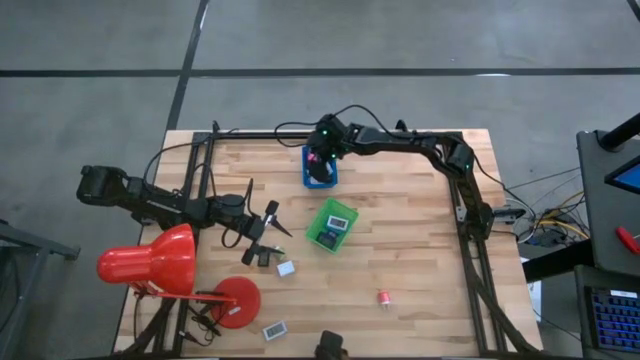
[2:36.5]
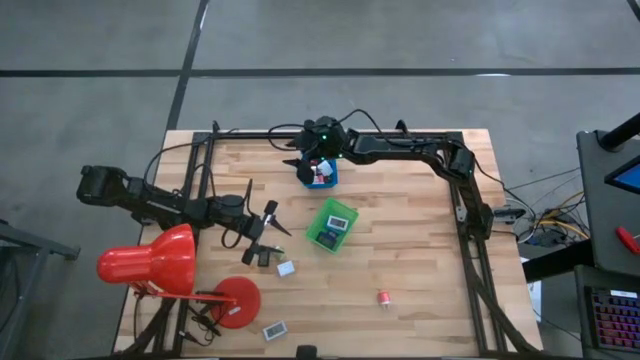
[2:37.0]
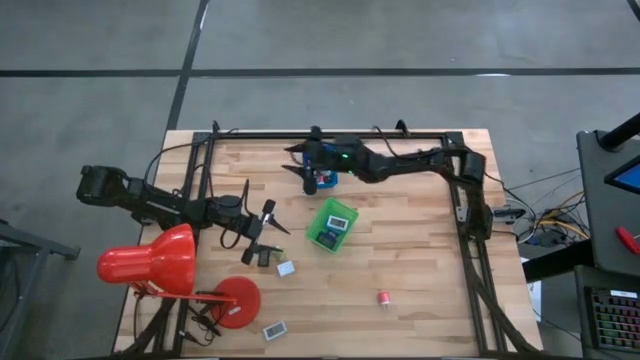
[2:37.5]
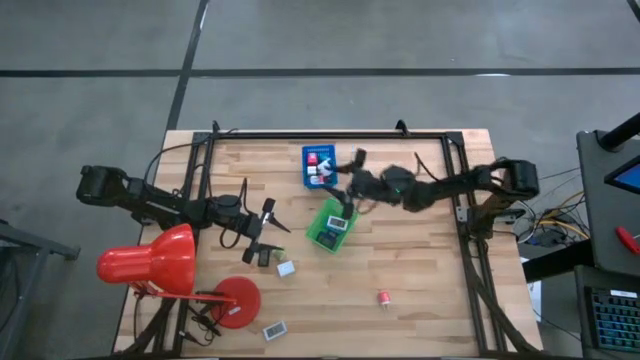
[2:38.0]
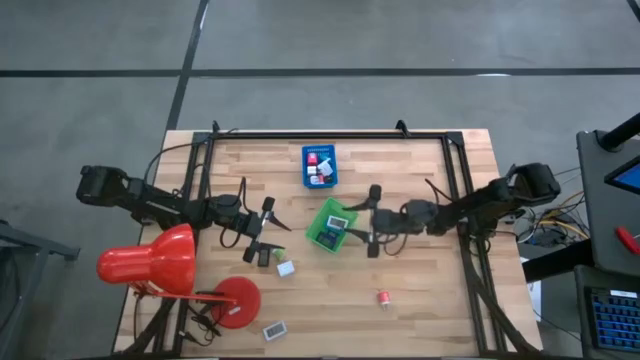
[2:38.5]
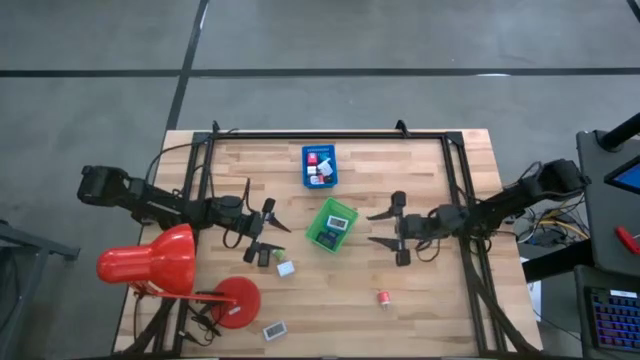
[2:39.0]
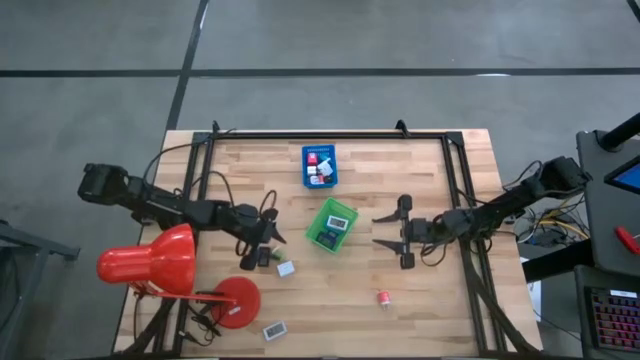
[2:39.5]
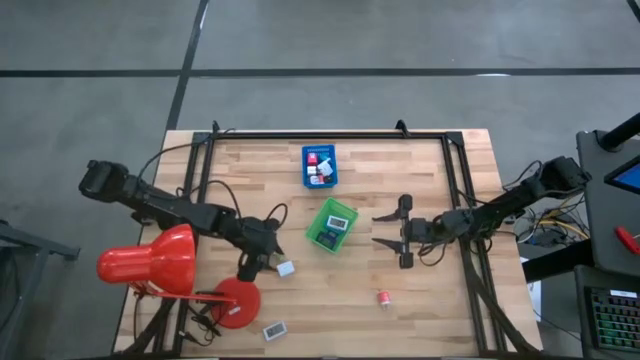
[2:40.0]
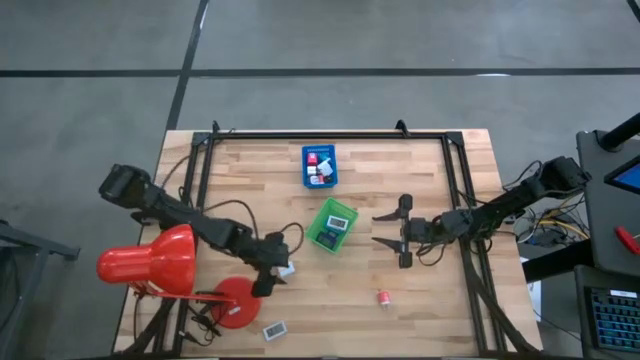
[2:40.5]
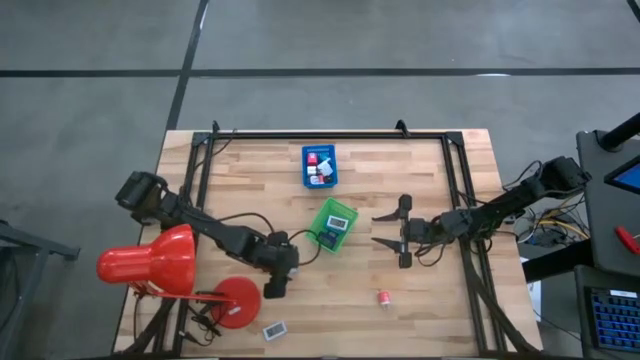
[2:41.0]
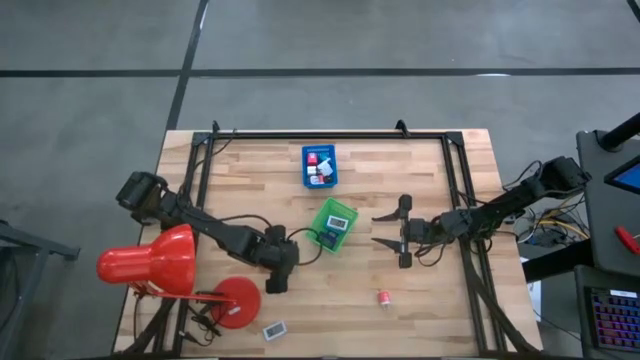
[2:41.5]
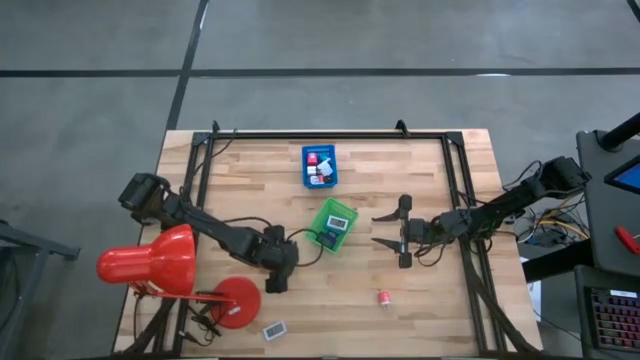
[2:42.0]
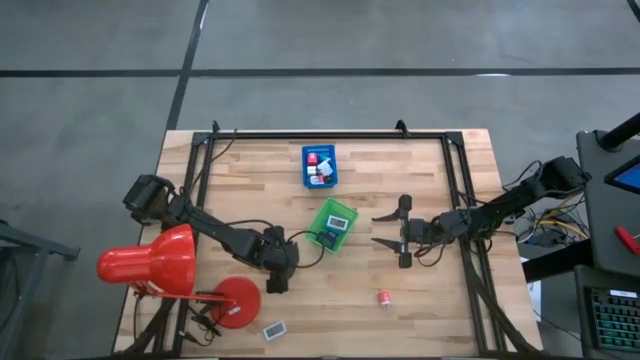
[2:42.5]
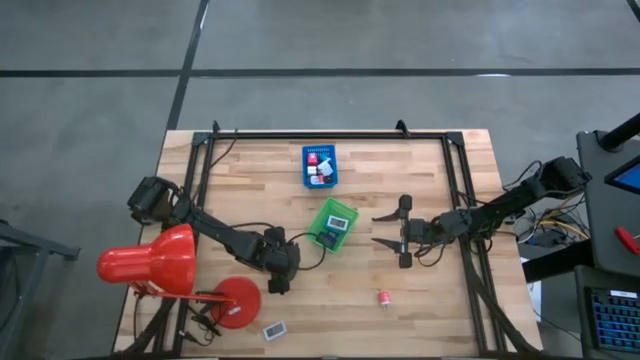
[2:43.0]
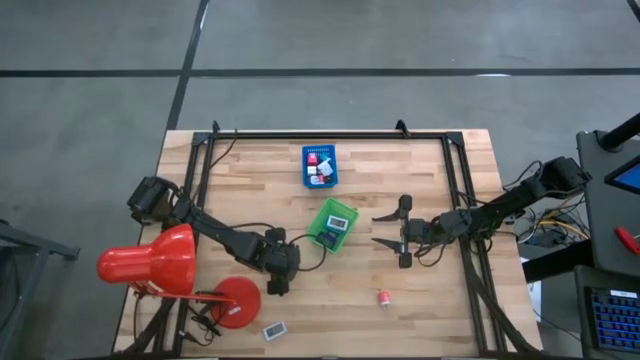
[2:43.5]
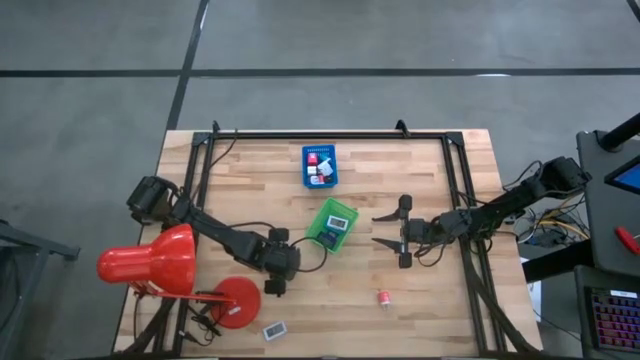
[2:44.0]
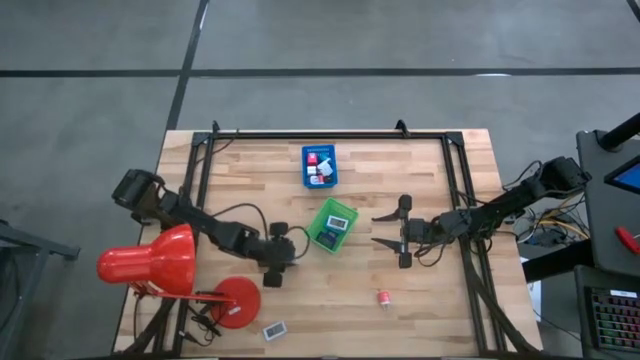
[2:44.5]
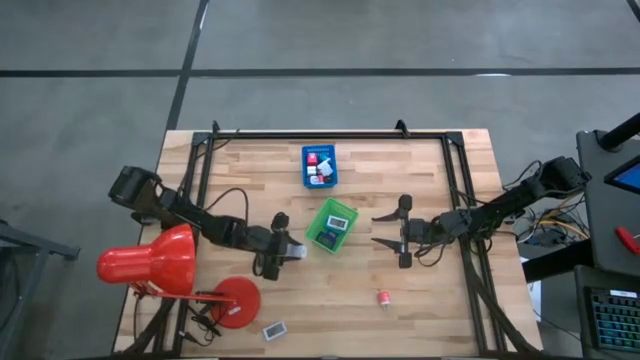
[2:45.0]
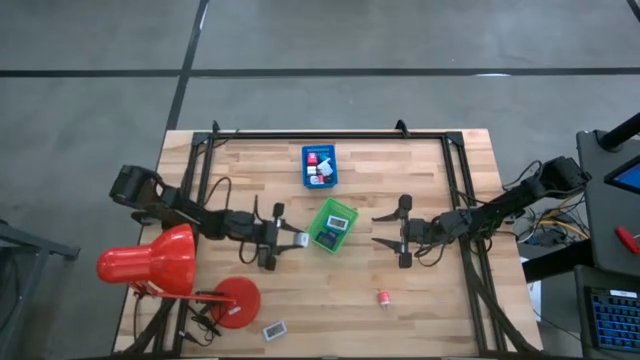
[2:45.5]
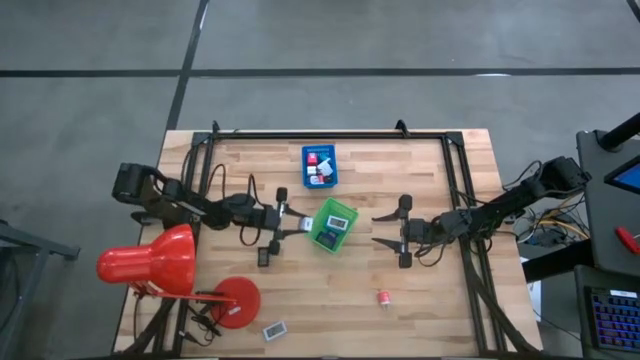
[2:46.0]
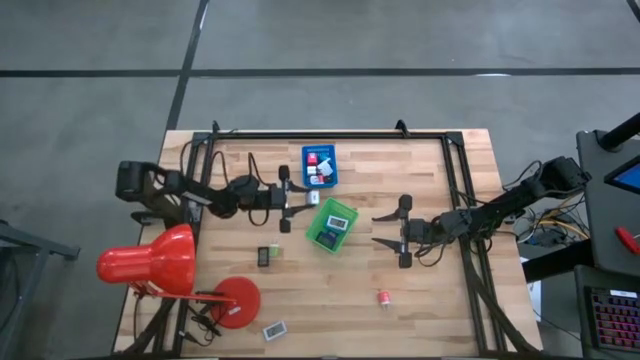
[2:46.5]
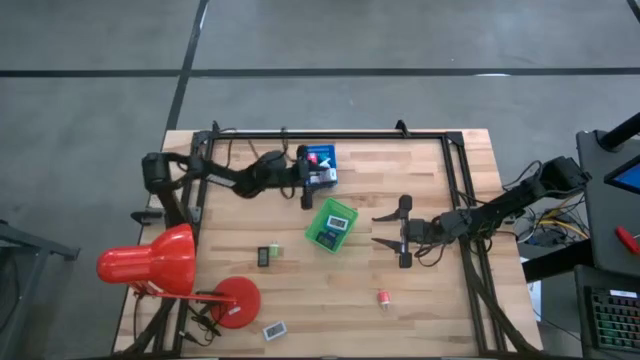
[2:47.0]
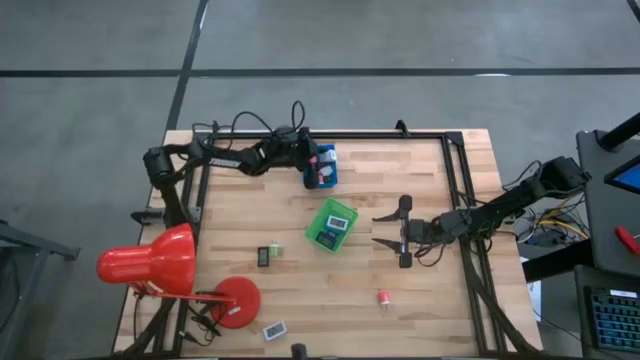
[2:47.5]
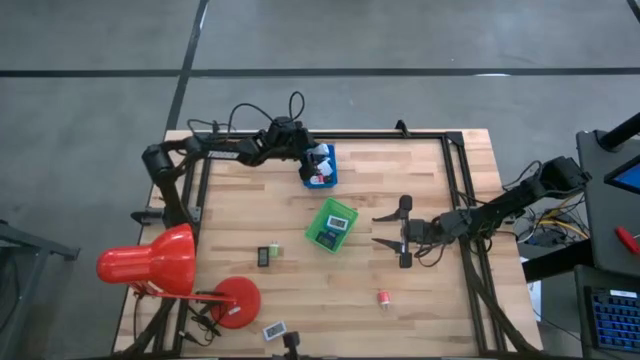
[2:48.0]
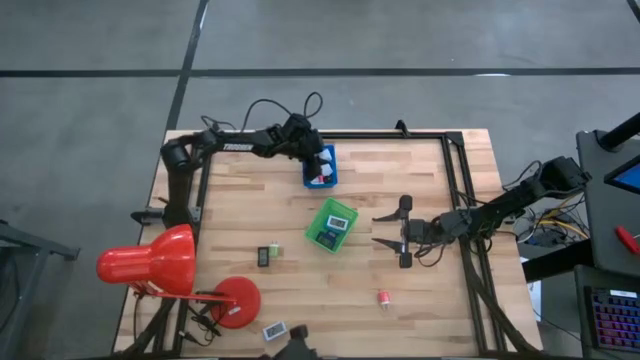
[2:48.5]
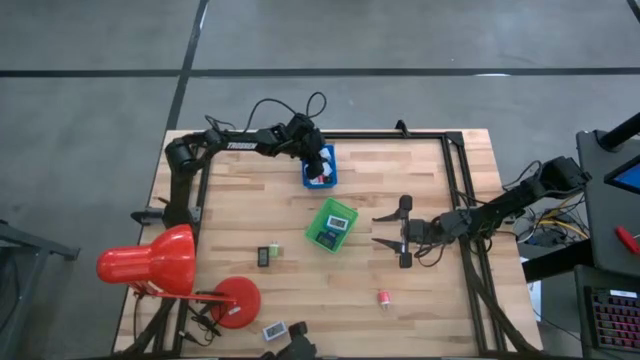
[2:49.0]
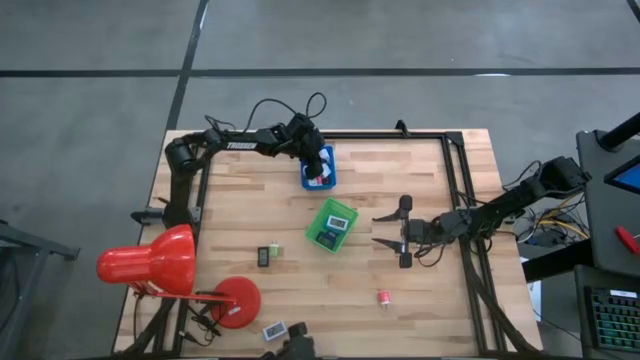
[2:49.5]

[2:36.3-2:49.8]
Task: Pick & Place Office items
Put the big white charger adapter into the blue bin

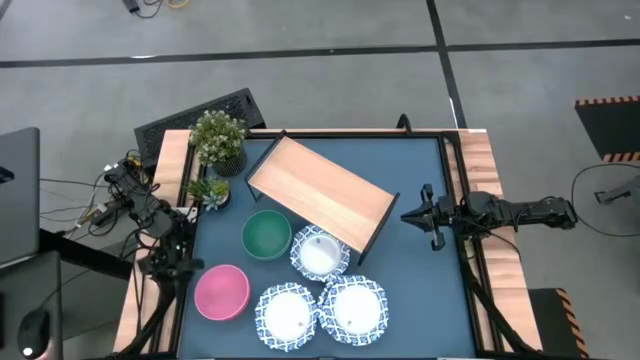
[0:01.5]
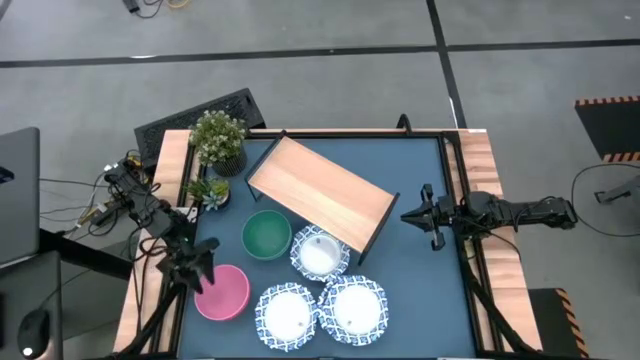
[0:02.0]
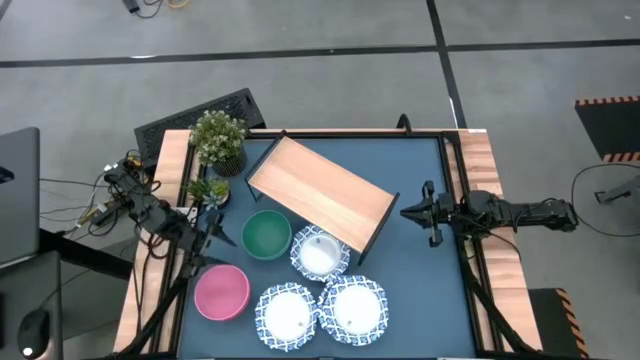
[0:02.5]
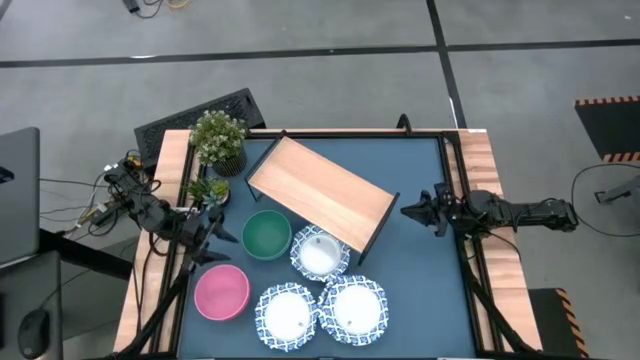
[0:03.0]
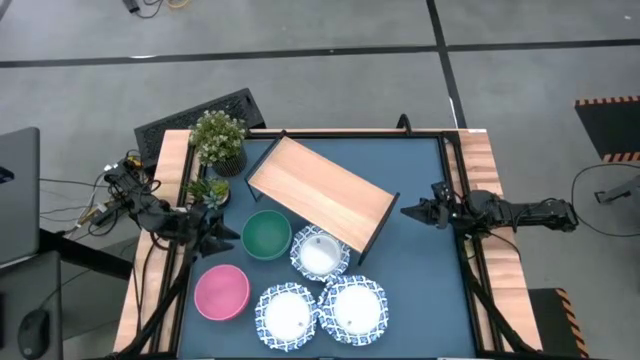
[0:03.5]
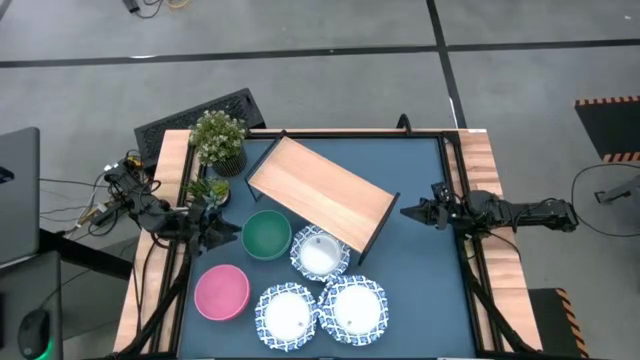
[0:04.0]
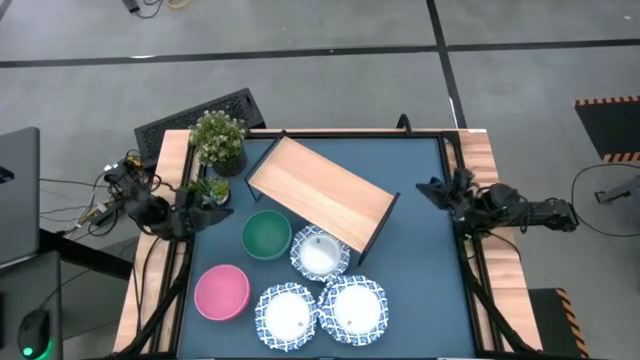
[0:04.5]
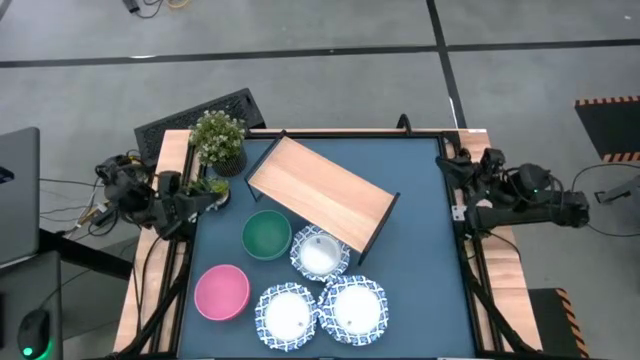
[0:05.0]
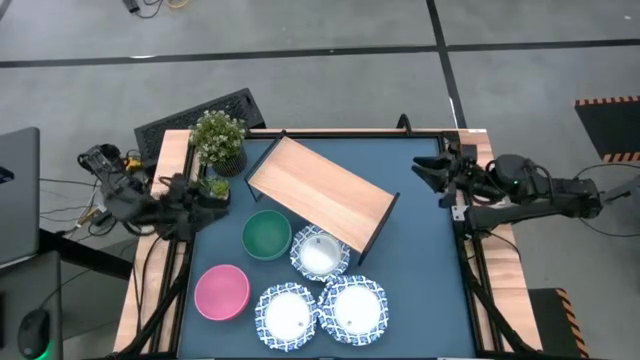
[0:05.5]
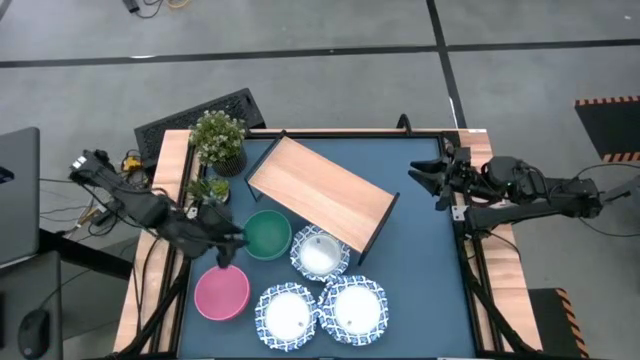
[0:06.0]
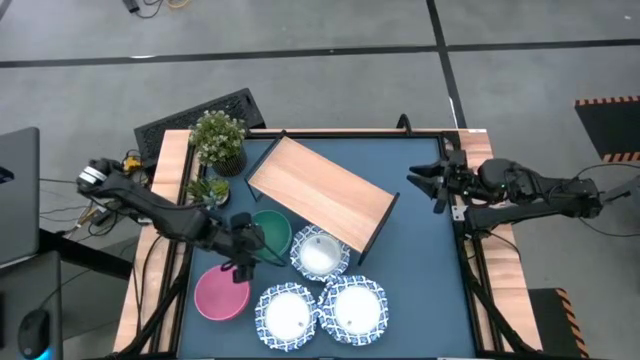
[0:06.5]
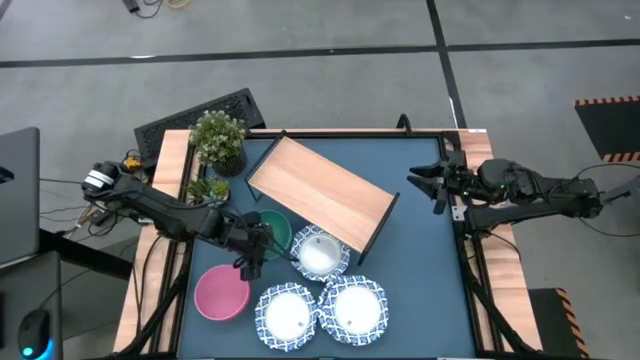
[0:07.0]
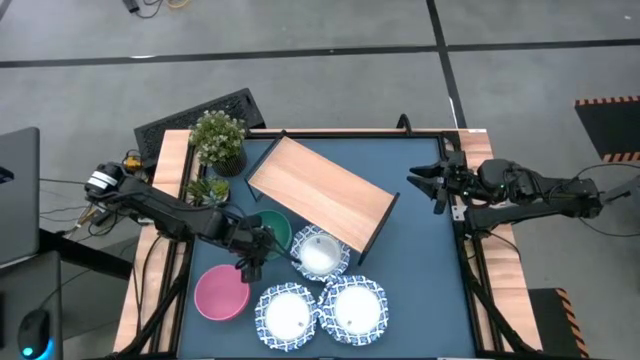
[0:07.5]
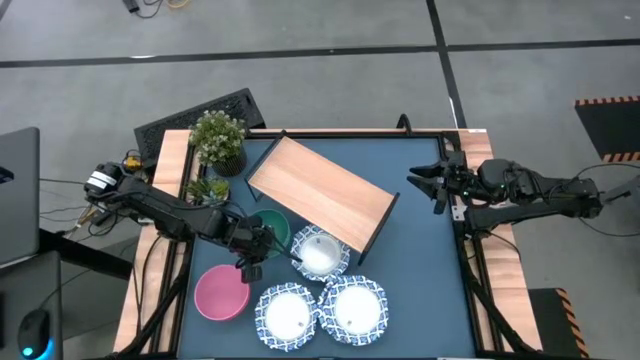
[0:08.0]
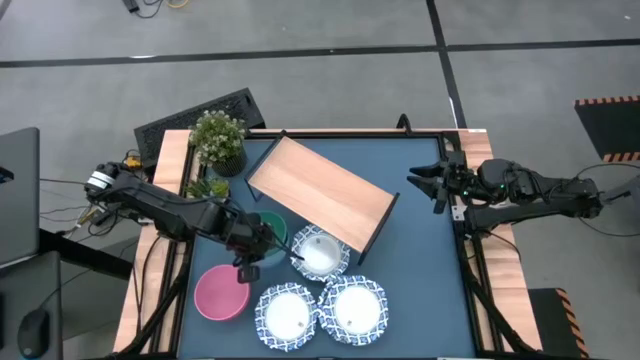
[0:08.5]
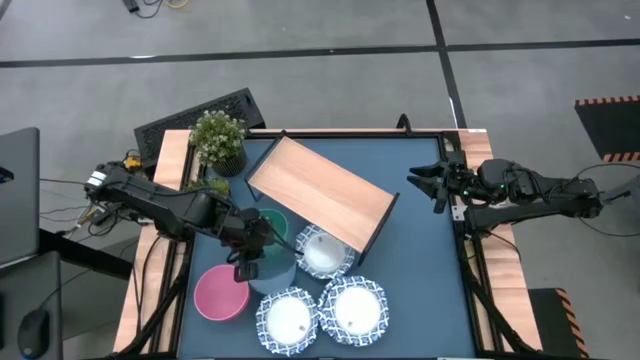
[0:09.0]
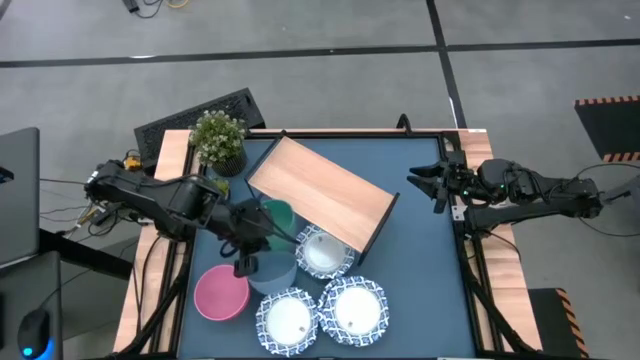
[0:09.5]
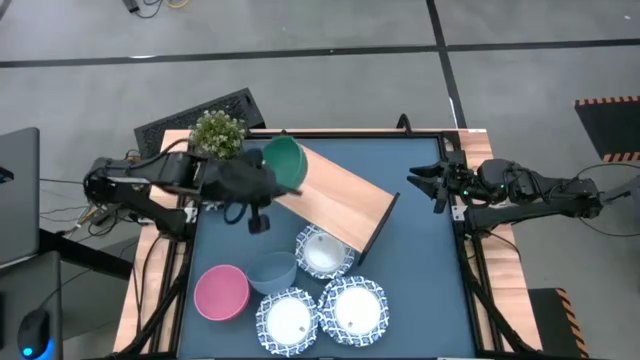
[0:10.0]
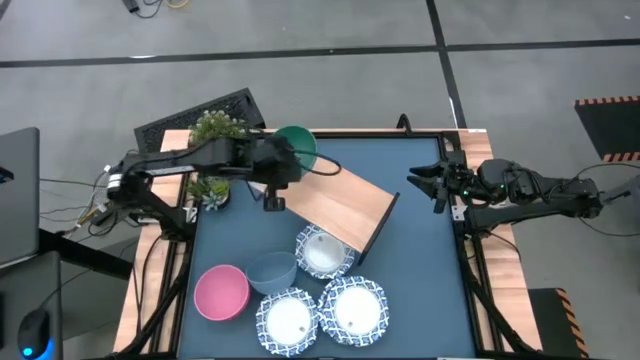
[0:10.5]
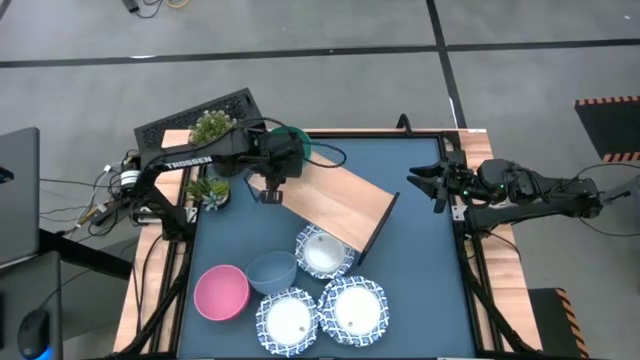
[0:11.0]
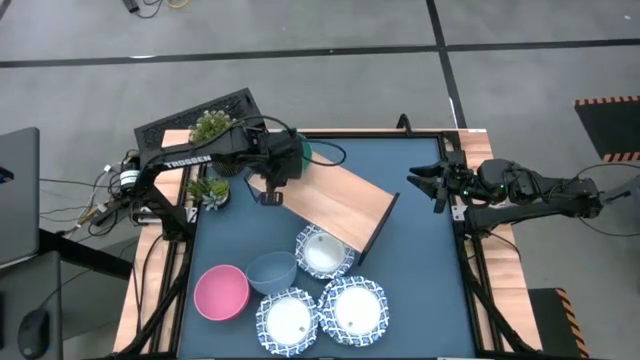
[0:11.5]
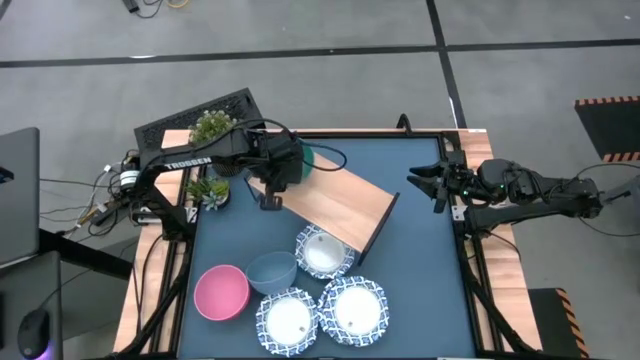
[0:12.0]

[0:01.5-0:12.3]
Task: Place and stack bowls onto a shelf
Put the green bowl on the shelf
